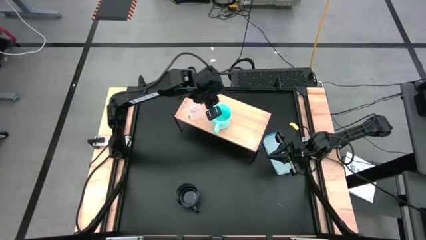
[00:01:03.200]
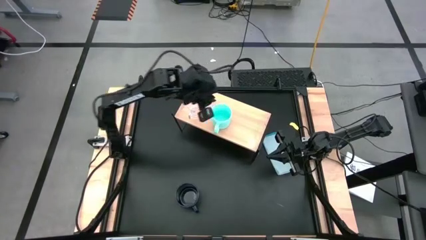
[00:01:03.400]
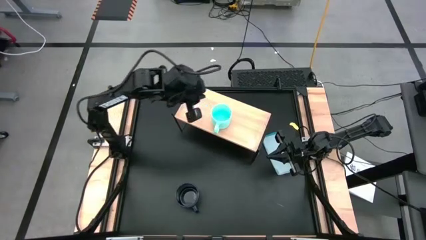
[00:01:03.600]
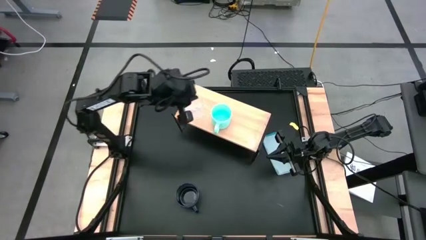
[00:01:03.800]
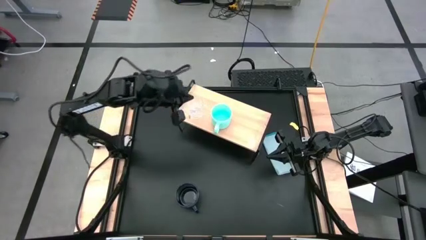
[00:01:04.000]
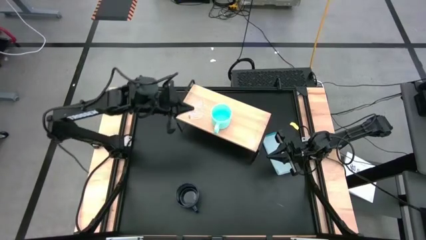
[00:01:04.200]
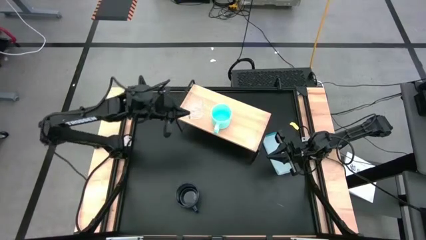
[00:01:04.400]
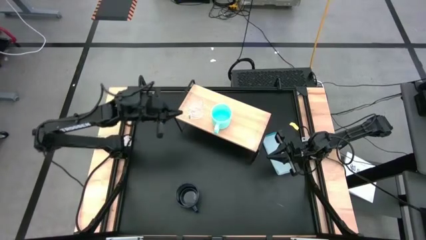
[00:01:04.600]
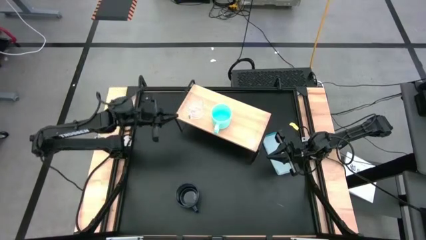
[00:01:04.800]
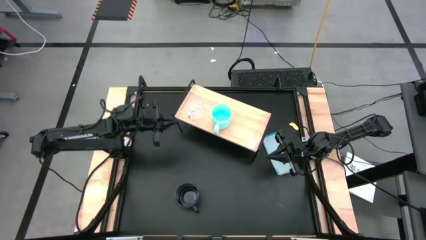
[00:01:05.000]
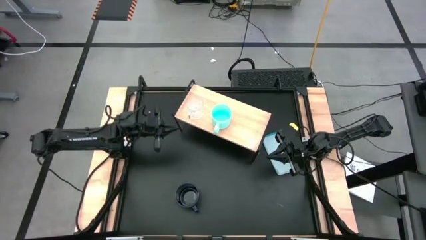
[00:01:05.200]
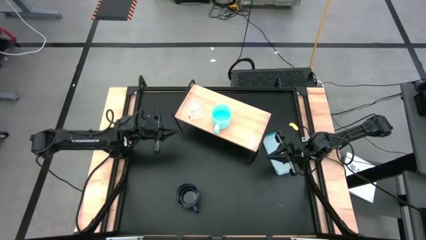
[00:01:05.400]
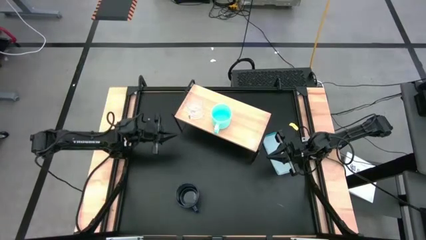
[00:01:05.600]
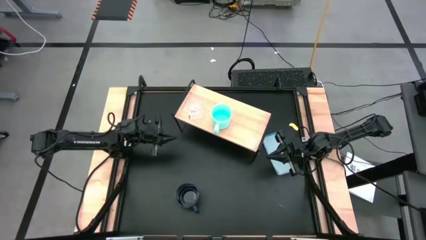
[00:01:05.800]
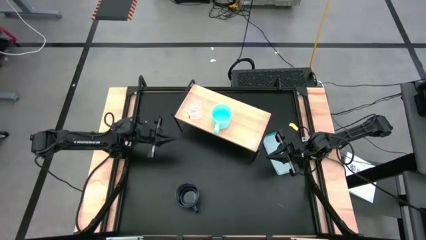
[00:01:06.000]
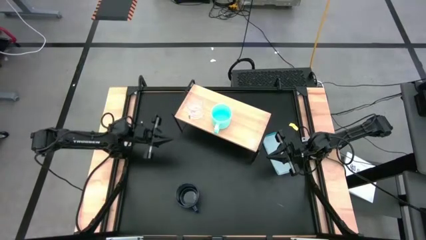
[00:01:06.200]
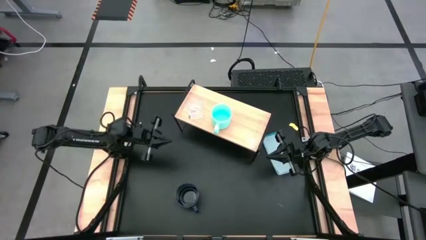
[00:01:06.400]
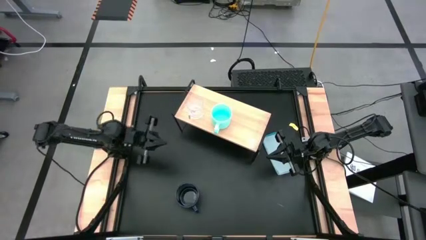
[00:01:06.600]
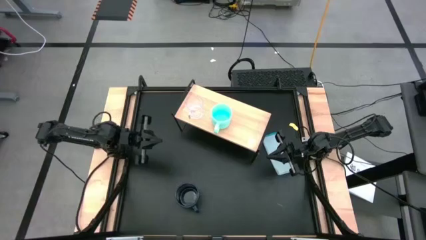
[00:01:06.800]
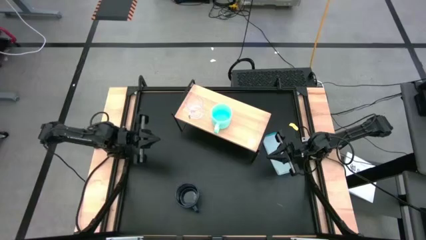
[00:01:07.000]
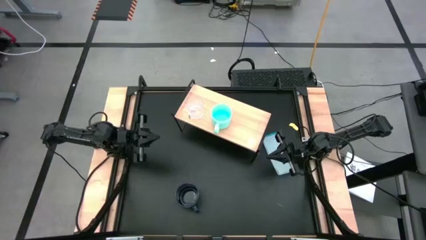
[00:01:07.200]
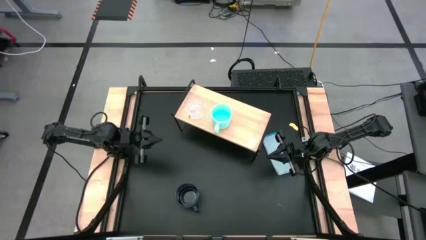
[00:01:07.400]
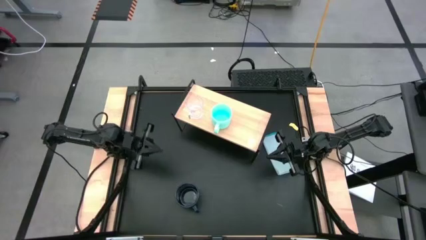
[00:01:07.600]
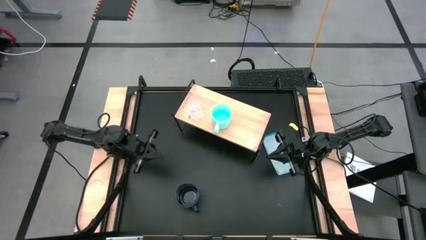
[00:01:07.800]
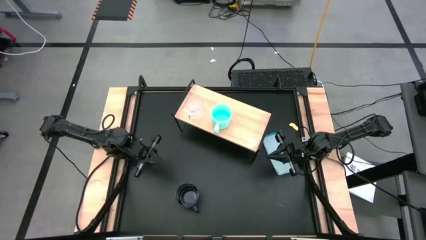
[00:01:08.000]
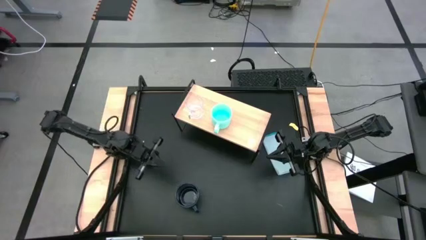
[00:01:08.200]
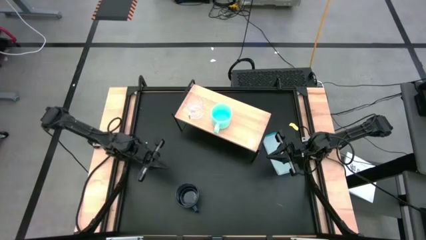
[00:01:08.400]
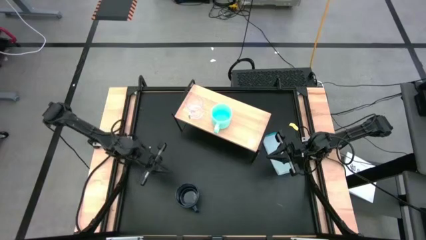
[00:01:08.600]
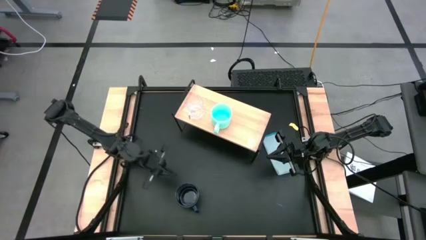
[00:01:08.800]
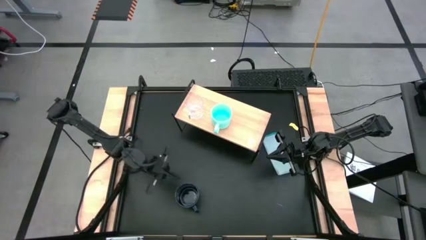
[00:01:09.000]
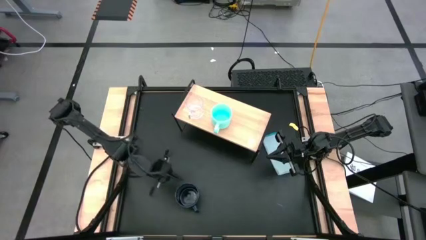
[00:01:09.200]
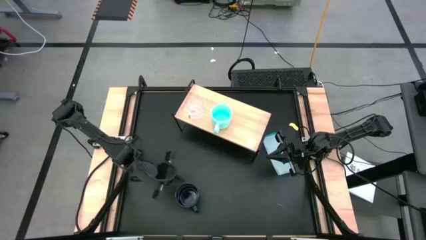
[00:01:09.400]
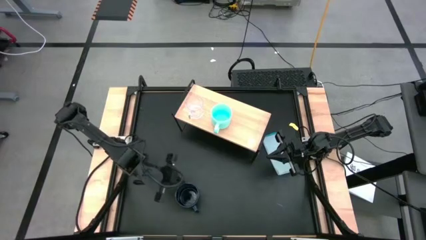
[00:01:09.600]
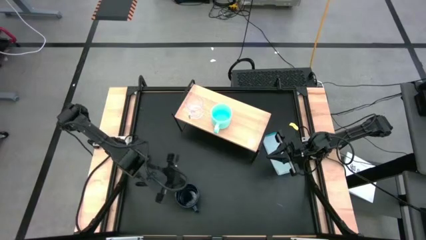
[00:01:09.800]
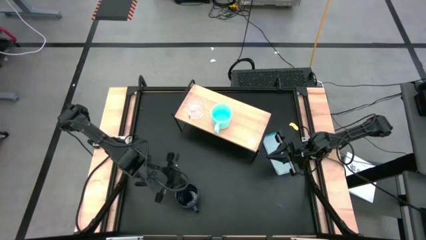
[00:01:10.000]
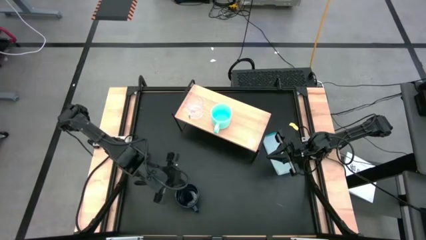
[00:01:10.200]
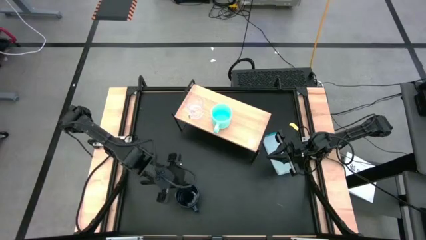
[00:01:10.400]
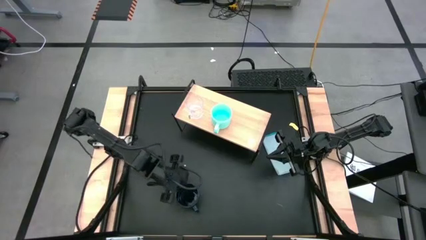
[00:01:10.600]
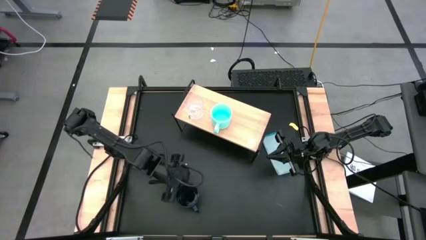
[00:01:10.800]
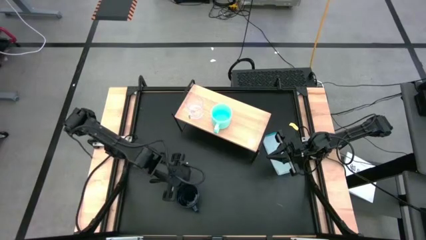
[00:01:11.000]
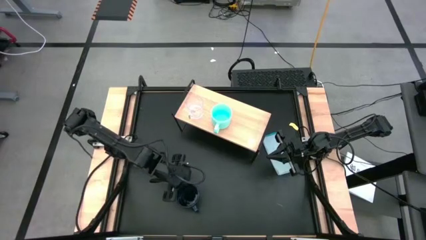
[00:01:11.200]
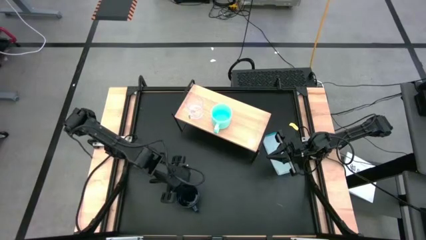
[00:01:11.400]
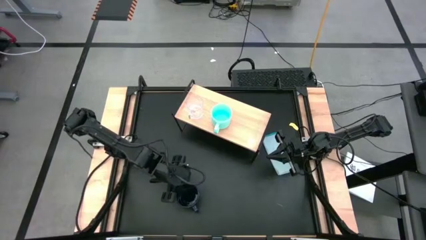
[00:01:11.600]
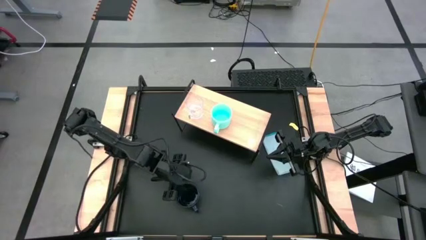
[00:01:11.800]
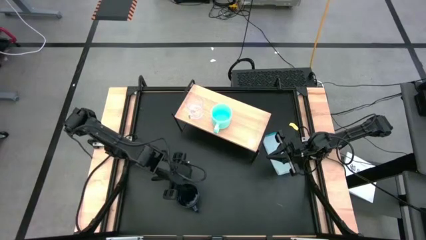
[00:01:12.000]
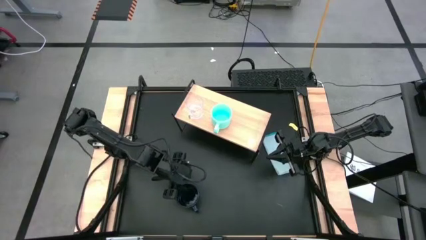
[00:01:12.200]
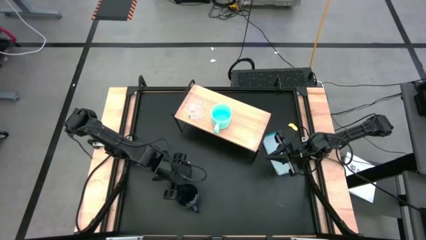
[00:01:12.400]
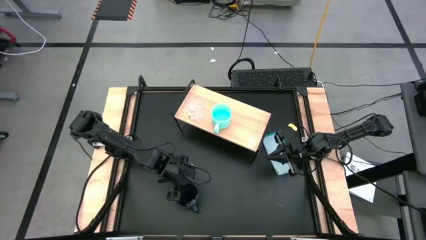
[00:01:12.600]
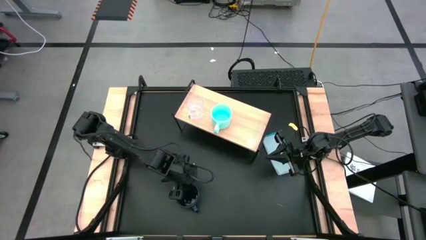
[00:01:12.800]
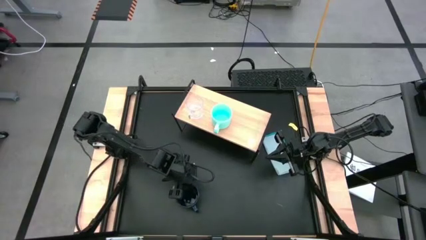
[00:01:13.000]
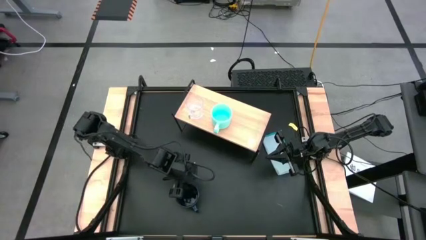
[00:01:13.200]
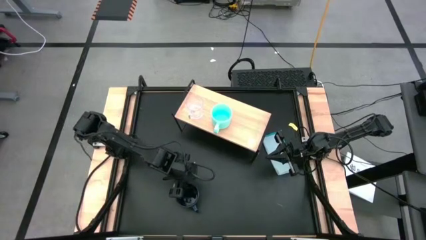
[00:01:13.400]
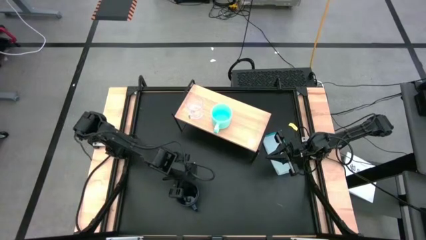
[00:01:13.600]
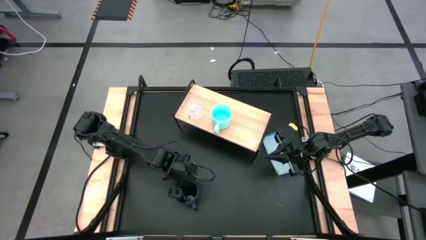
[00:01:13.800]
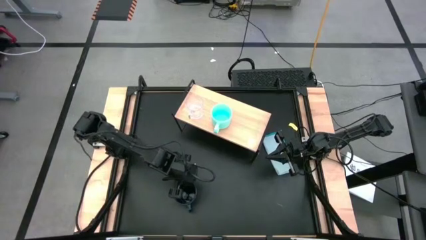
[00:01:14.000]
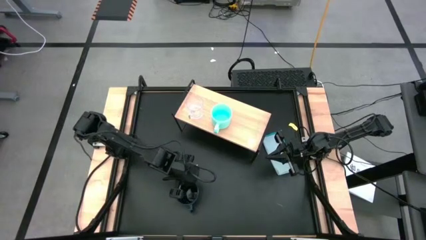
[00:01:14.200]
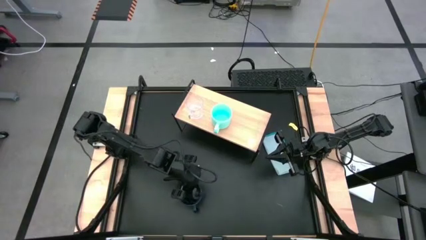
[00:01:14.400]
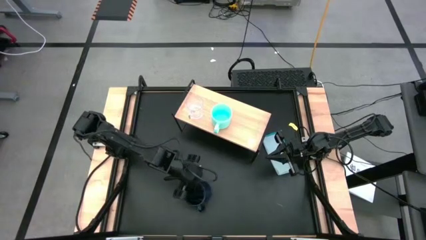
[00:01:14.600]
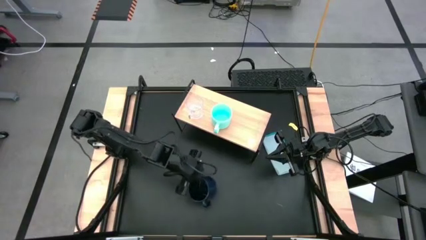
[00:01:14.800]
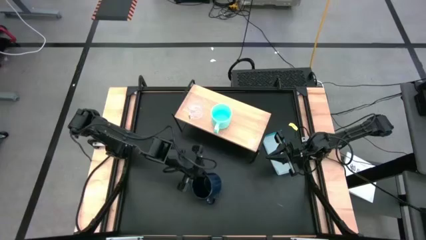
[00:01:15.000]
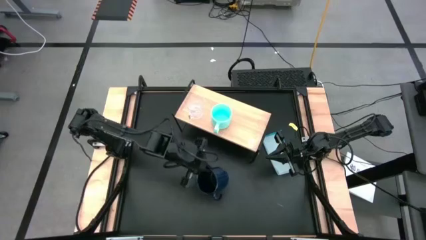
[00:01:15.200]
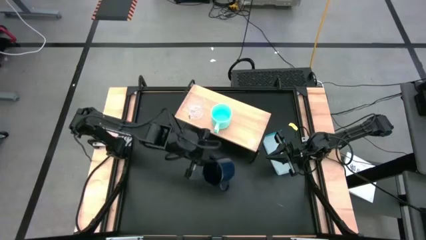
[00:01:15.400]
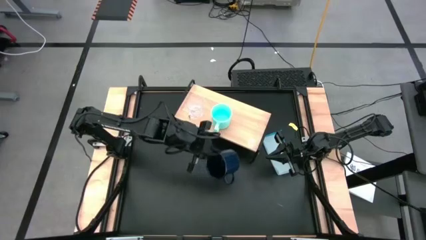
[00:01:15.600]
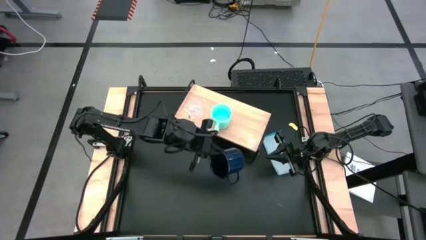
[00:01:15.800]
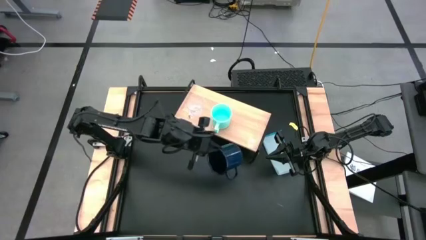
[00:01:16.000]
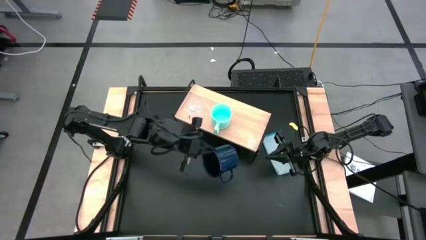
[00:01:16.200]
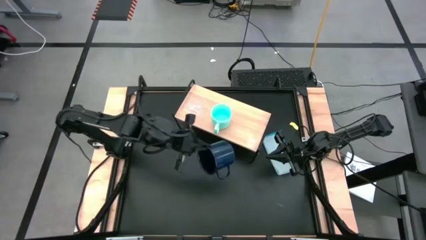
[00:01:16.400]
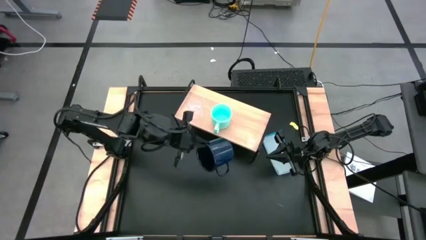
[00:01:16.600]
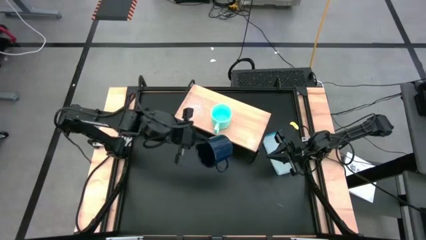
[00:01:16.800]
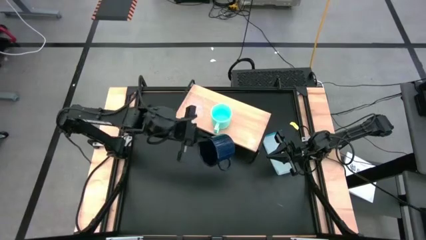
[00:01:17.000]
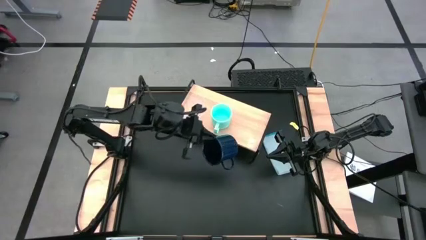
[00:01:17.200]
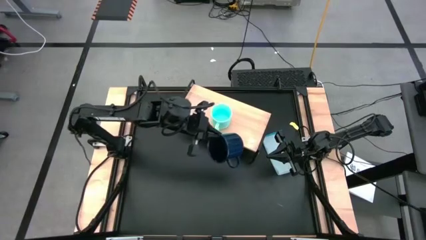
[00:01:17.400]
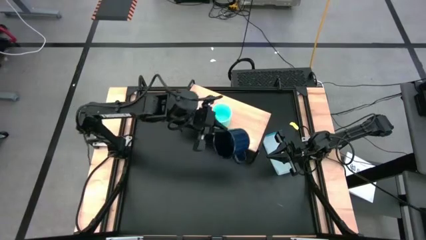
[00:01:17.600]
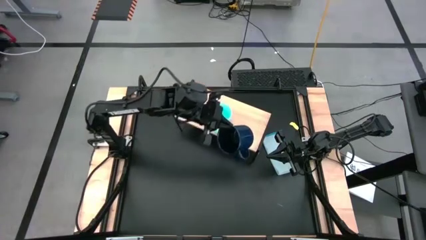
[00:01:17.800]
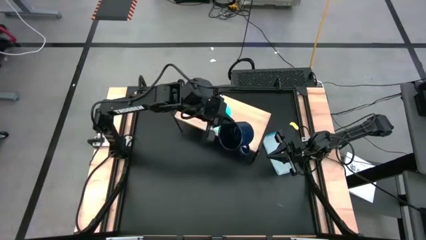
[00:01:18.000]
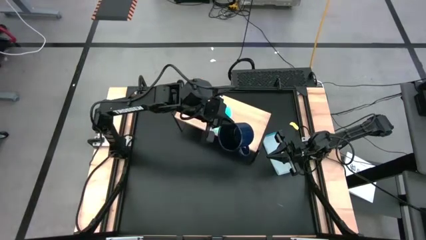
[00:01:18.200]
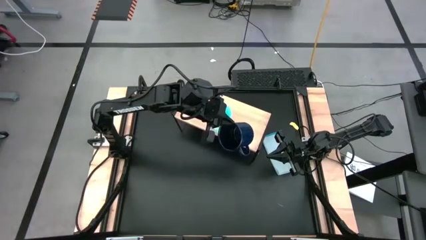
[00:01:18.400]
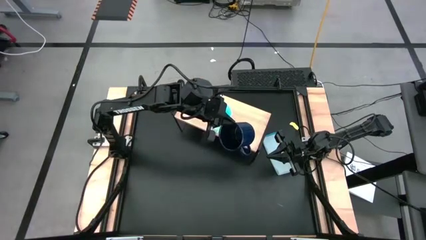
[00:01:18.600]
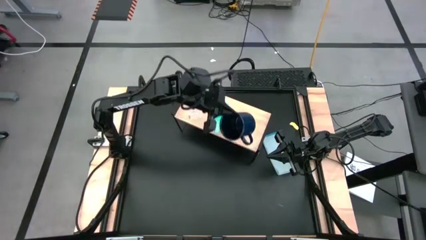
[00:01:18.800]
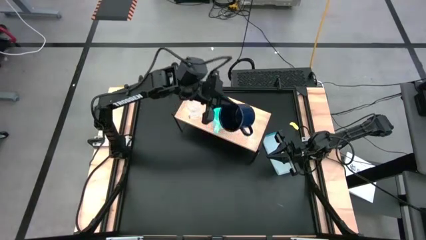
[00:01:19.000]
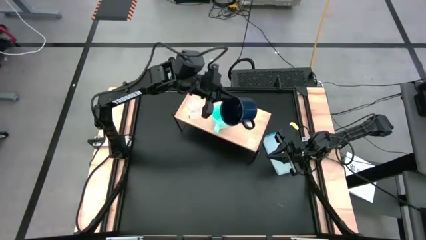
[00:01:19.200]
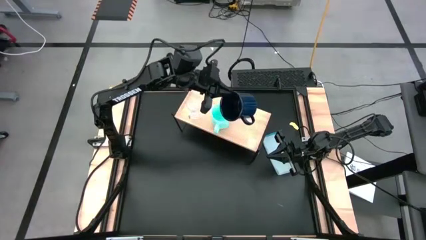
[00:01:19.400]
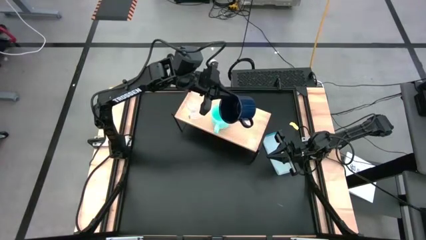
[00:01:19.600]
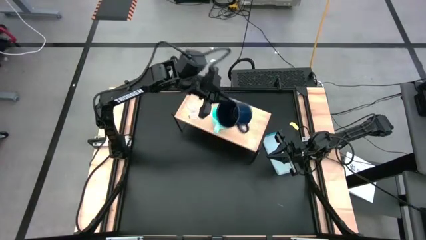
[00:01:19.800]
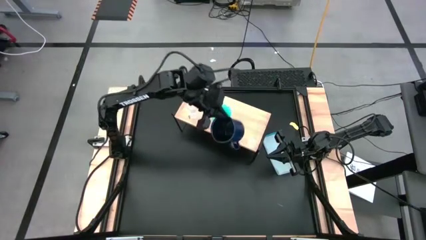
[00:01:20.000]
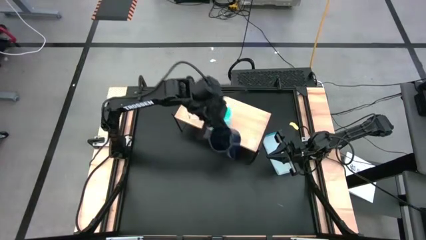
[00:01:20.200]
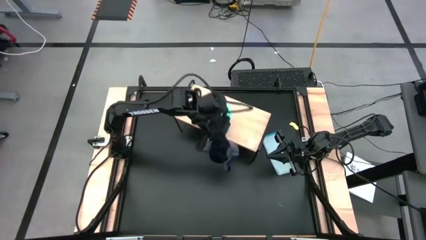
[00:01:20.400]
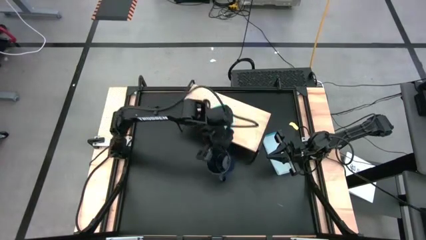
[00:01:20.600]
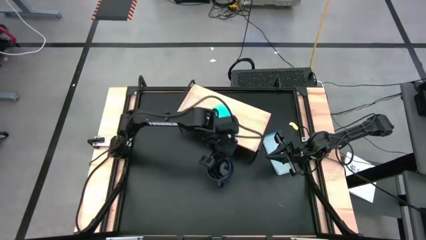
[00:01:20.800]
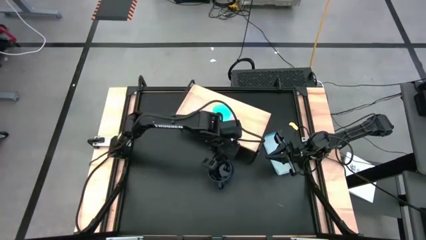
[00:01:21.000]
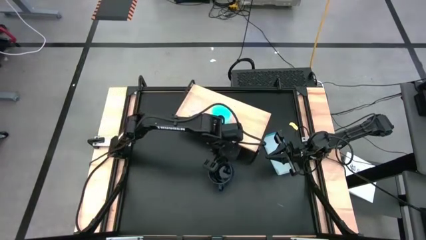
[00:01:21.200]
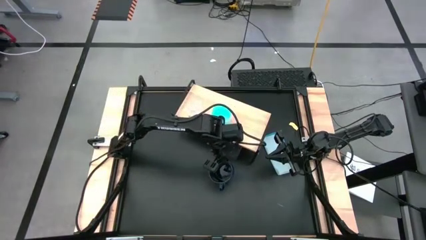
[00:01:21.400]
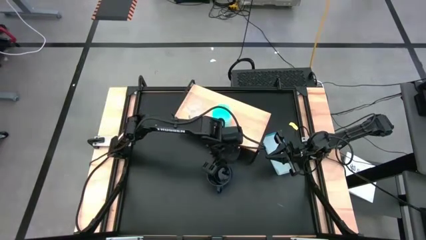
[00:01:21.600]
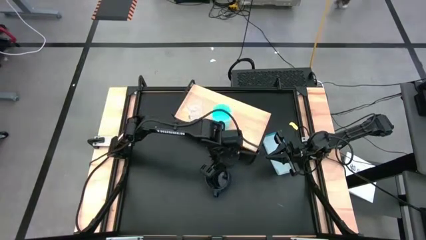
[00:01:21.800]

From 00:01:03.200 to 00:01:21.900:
Task: Stack small to large cups/mugs on shelf
Put the dark blue mug on the shelf
